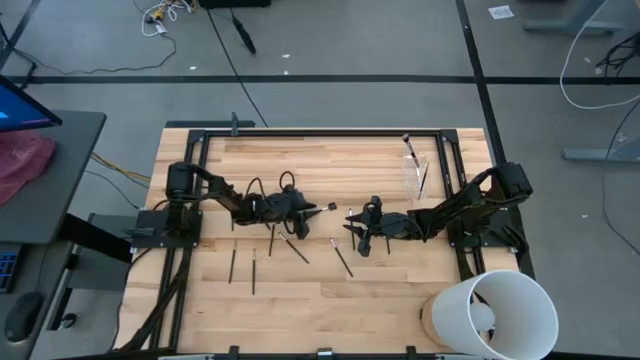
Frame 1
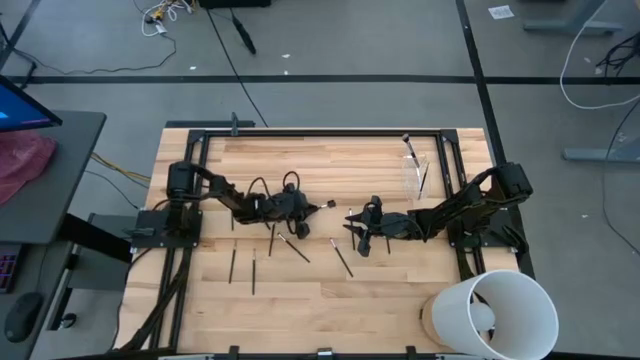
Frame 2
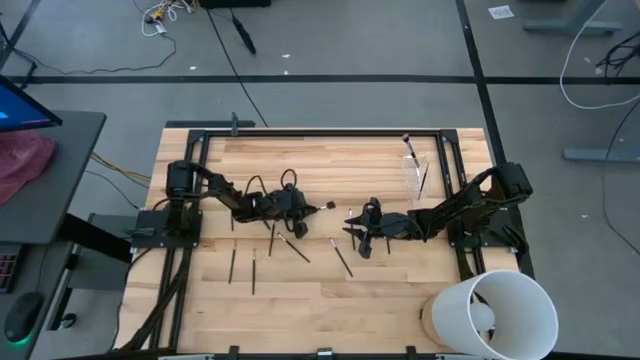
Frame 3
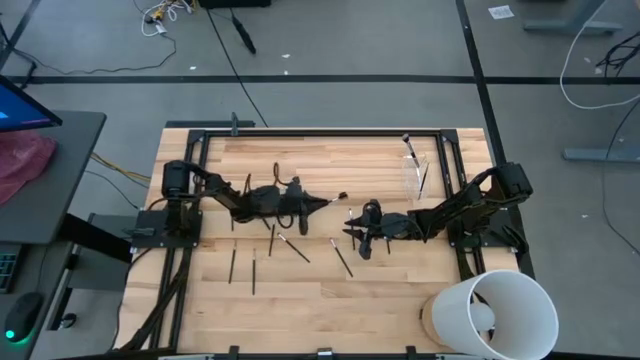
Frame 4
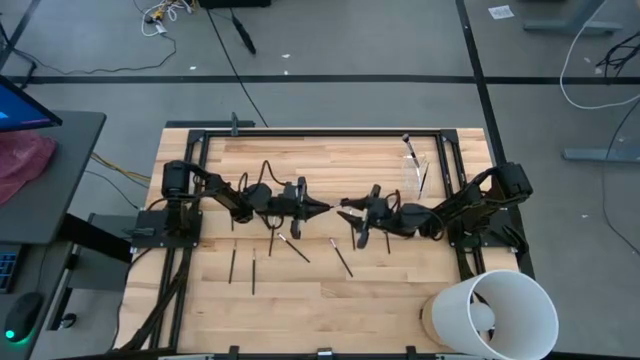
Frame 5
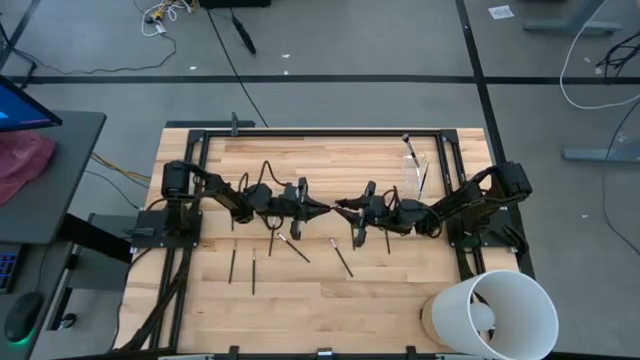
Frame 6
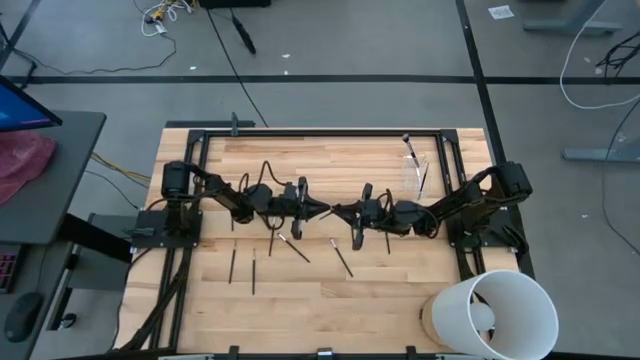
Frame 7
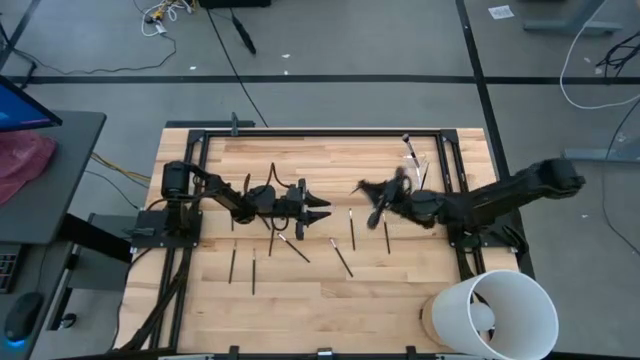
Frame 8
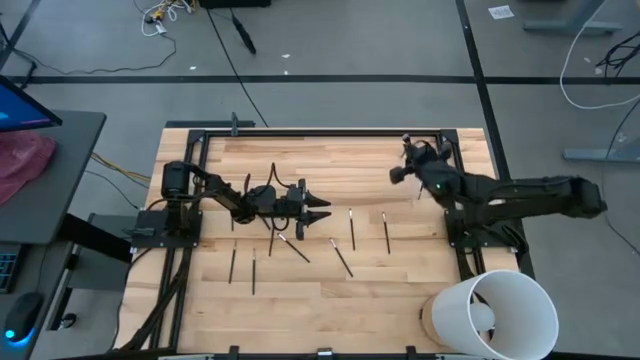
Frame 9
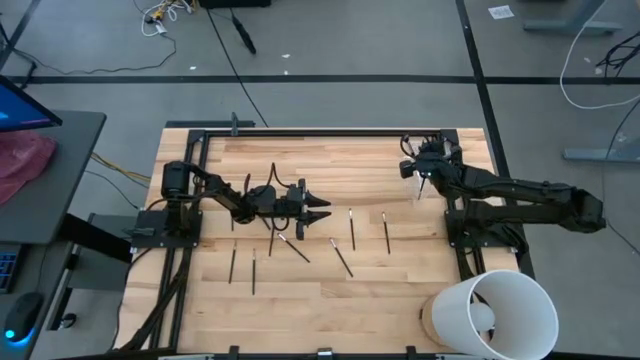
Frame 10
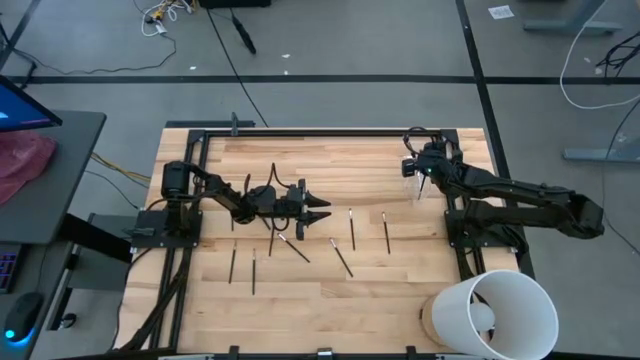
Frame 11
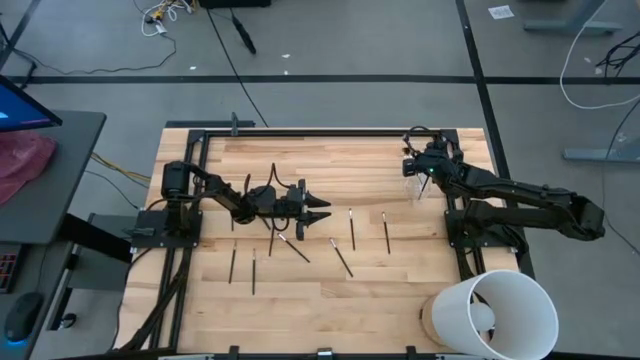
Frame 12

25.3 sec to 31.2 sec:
Task: Put items in baskets/containers
Put the eye groomer brush into the transparent organizer

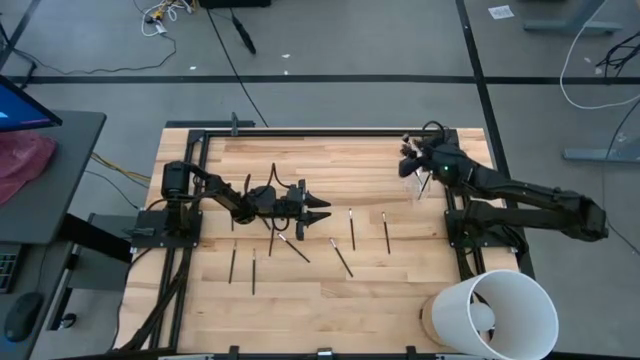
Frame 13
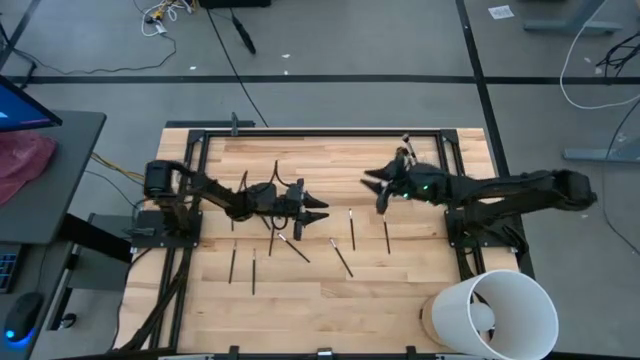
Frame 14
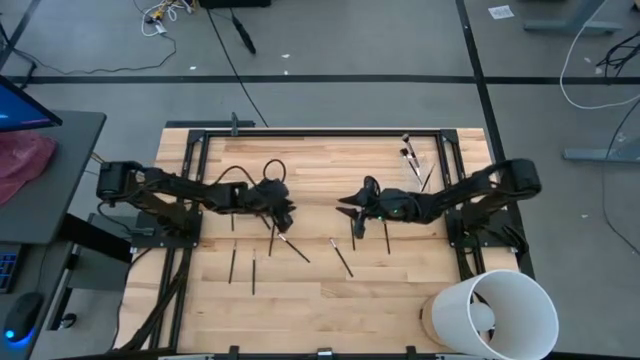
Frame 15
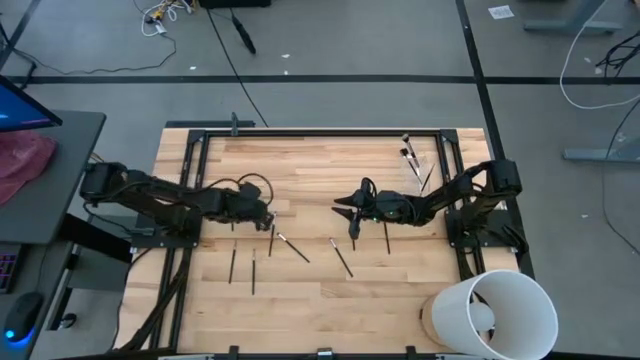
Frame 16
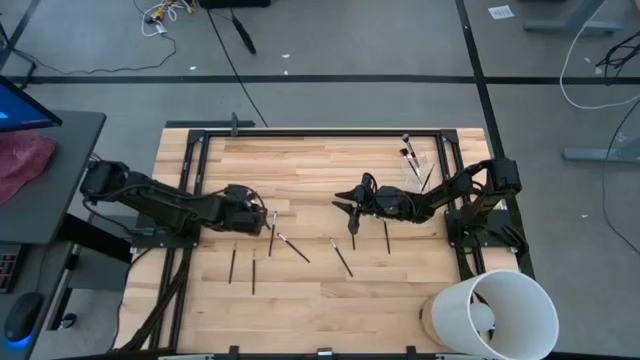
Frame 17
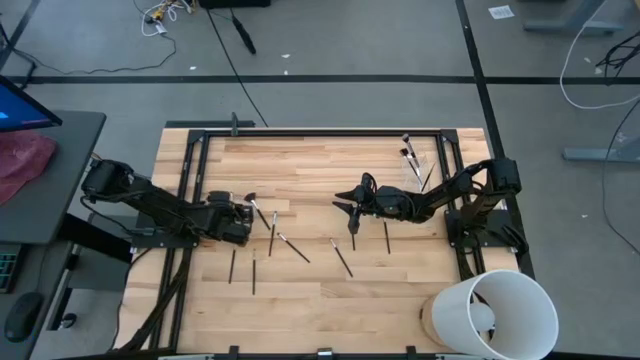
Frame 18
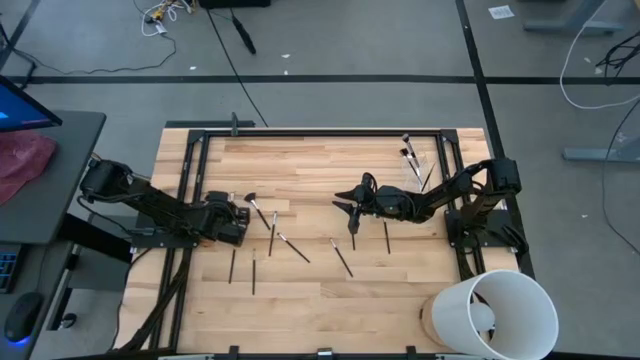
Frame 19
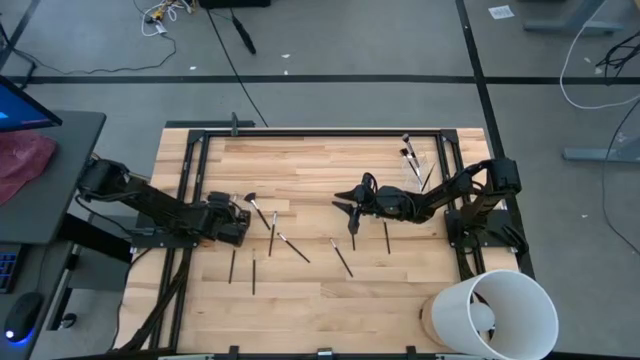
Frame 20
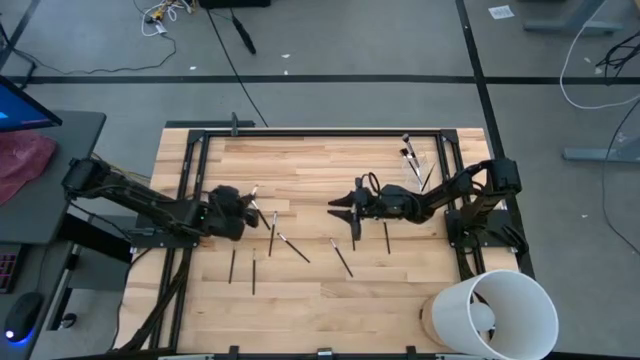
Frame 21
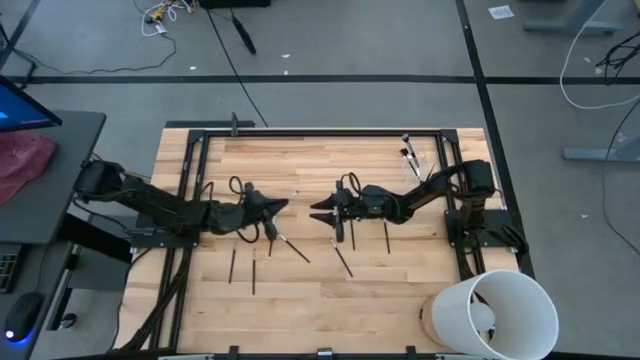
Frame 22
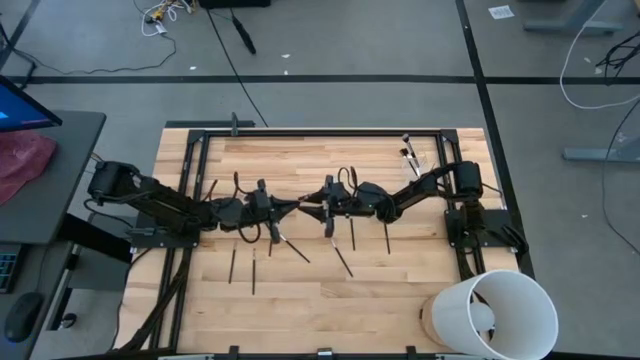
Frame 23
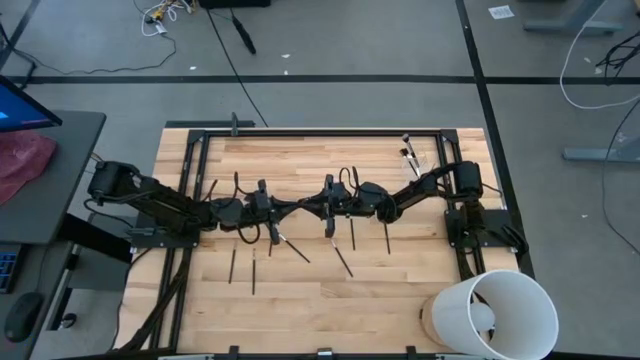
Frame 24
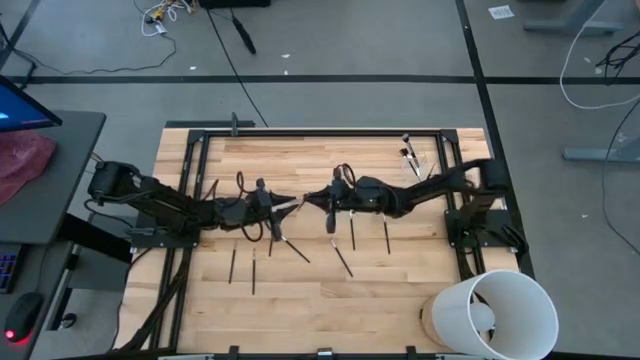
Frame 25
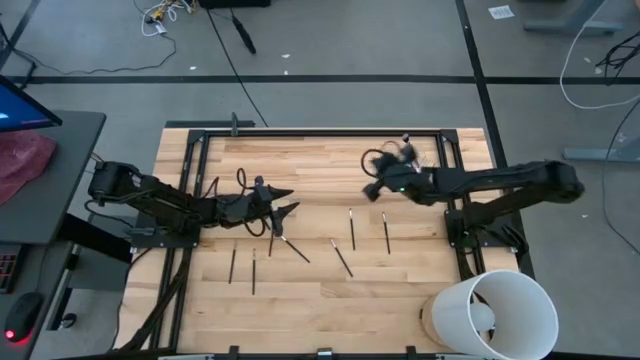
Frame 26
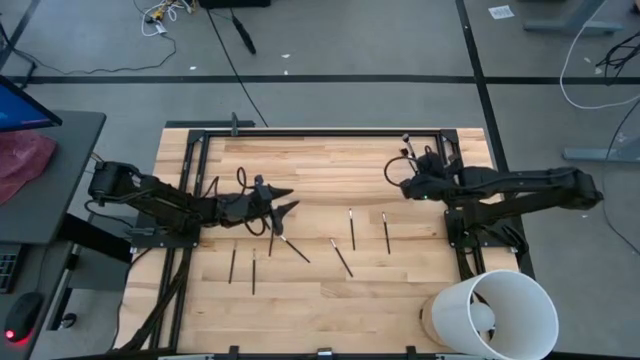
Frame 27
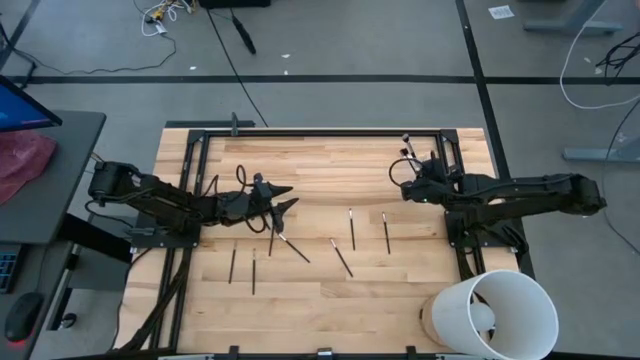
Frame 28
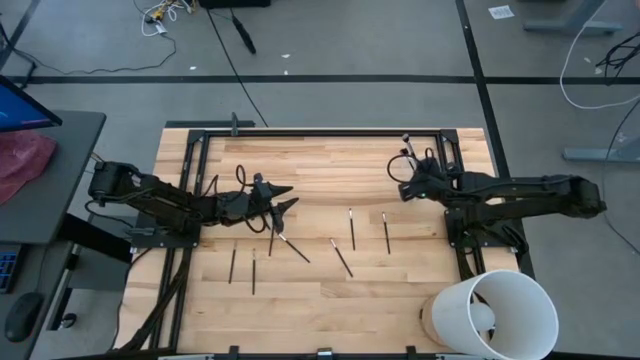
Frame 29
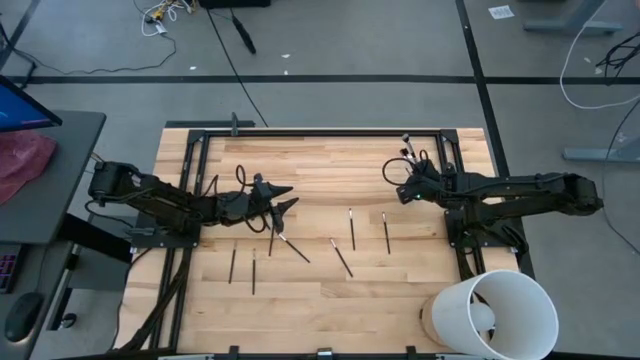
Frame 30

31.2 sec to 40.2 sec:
Put the eyeshadow brush into the transparent organizer

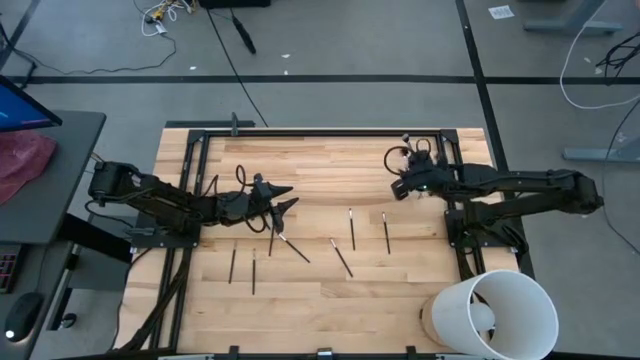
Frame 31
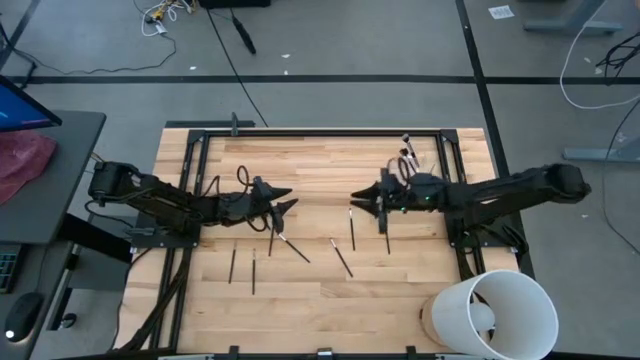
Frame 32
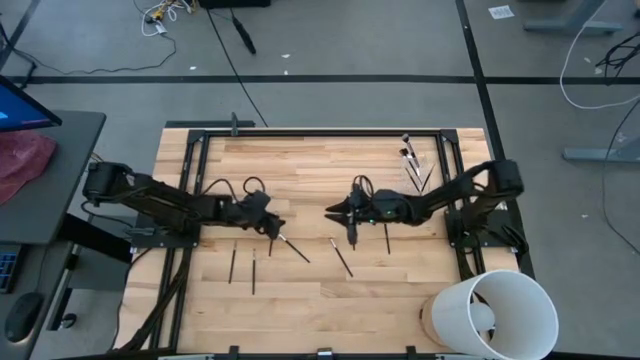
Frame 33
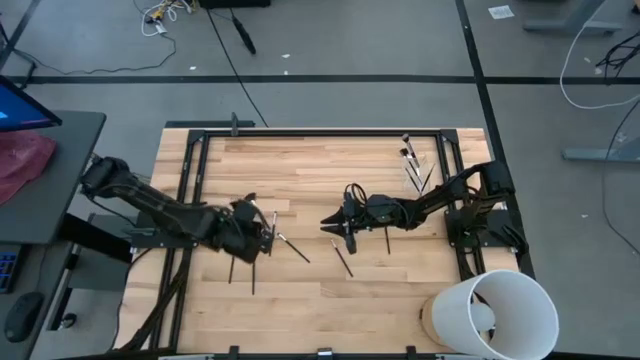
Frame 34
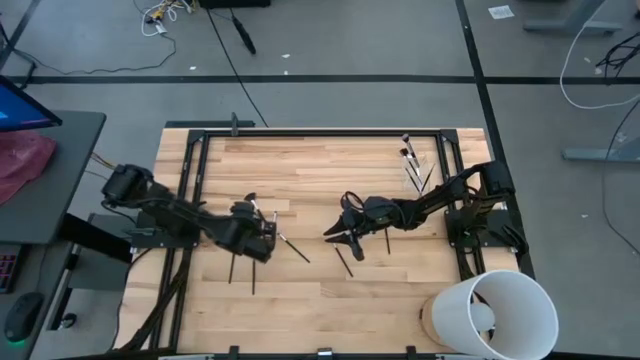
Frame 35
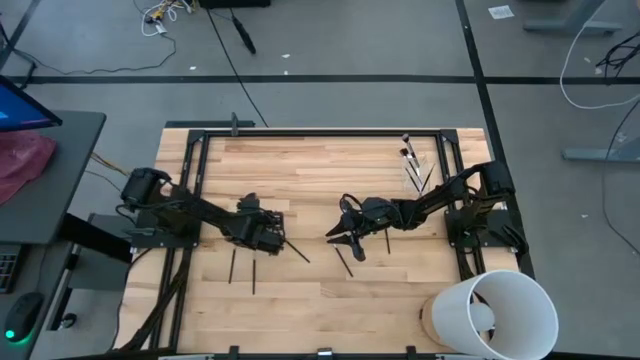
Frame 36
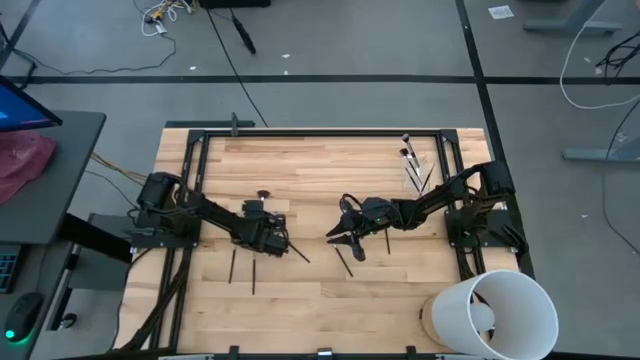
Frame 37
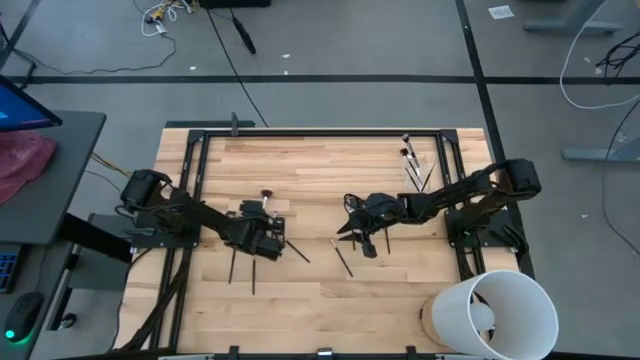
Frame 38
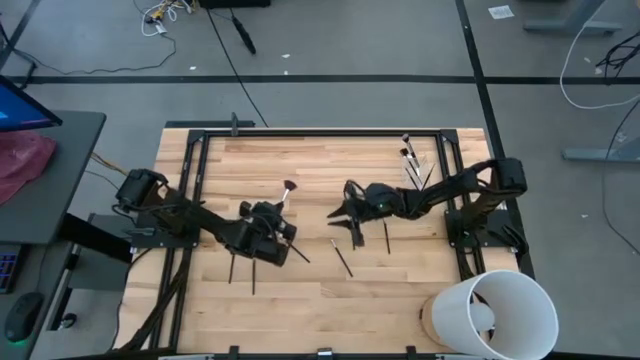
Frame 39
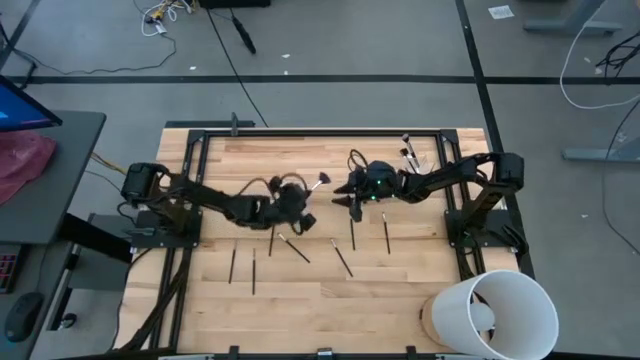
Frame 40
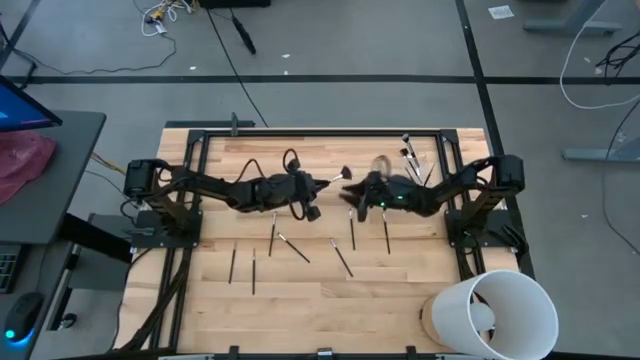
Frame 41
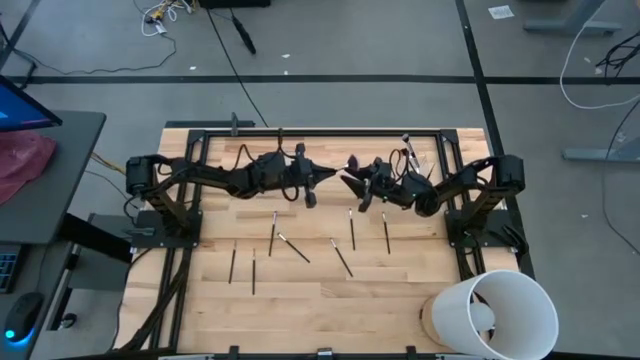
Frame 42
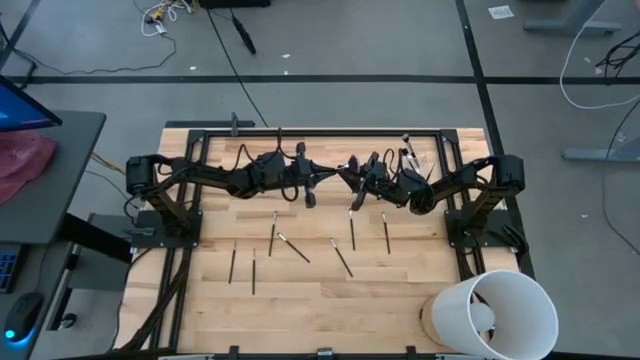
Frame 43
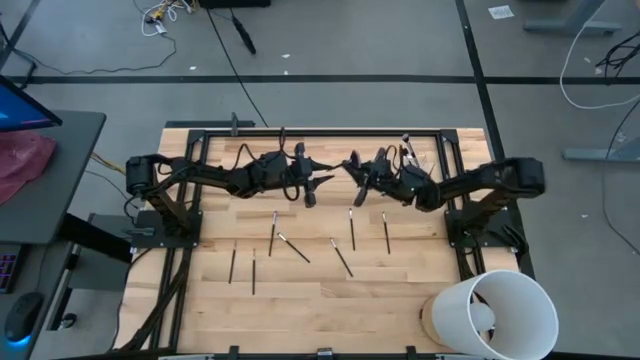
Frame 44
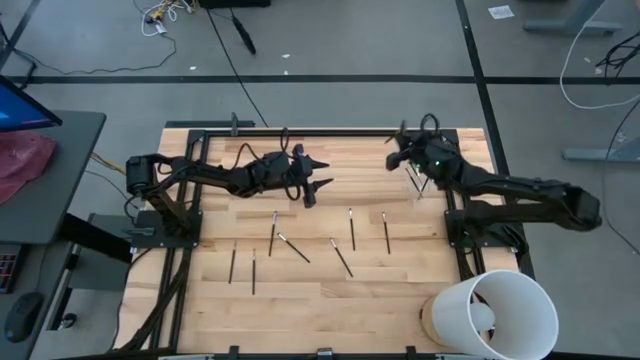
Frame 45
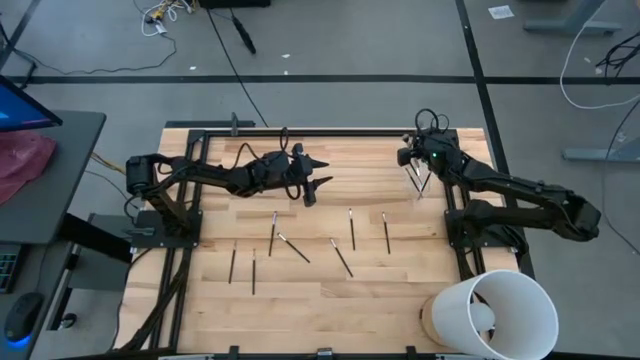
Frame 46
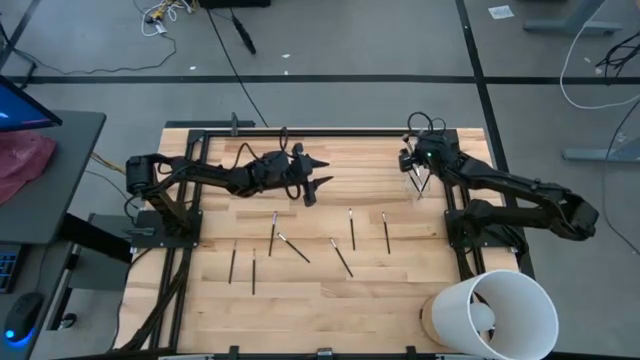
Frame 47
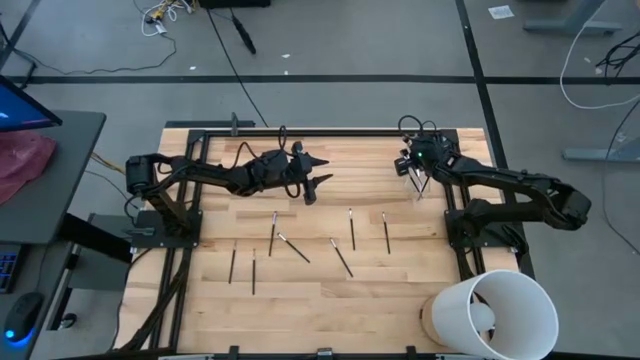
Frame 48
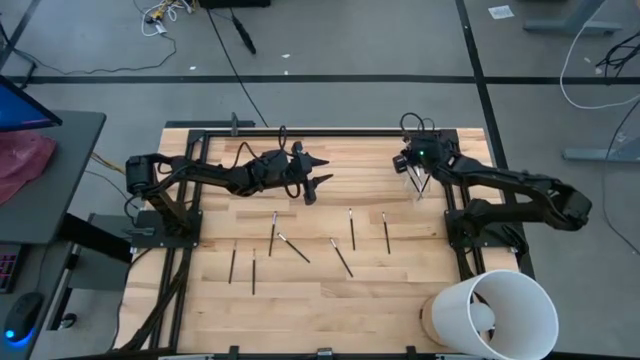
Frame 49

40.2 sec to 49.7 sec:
Put the highlighter brush into the transparent organizer
